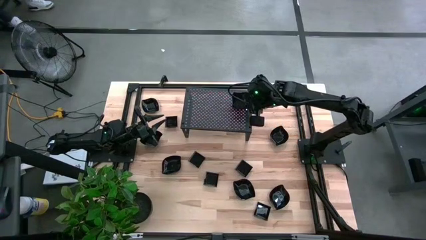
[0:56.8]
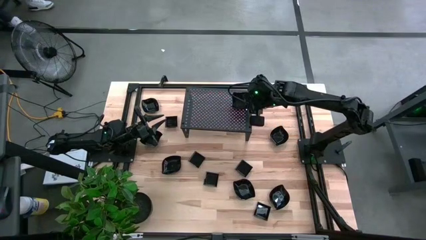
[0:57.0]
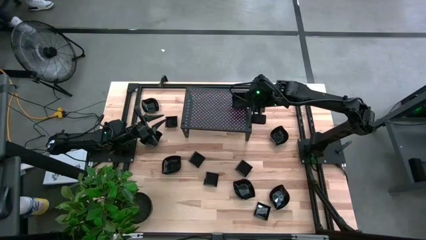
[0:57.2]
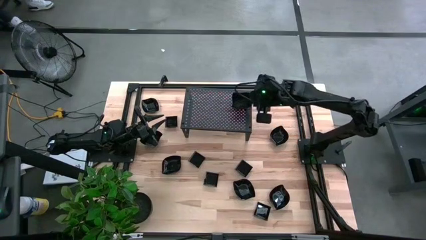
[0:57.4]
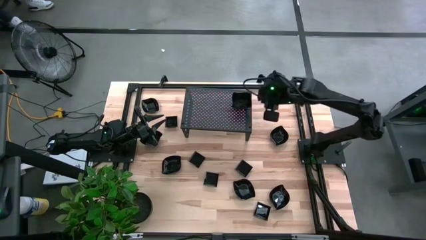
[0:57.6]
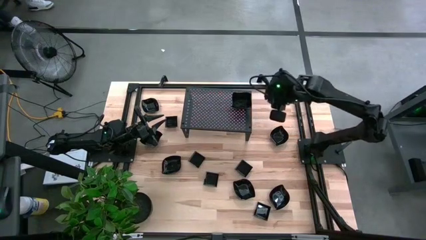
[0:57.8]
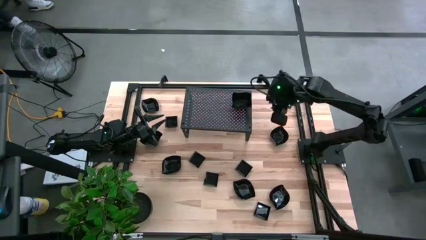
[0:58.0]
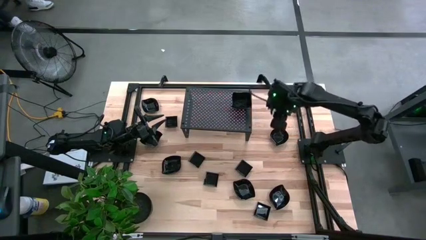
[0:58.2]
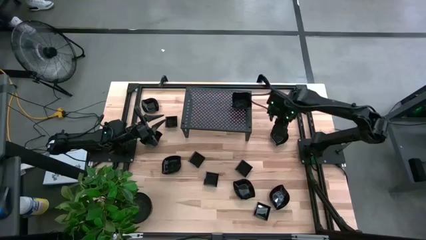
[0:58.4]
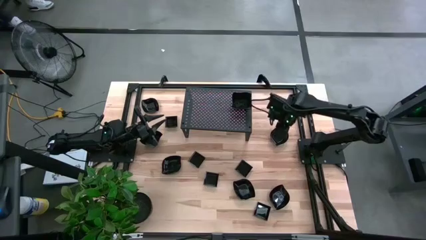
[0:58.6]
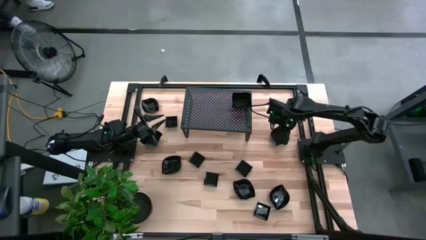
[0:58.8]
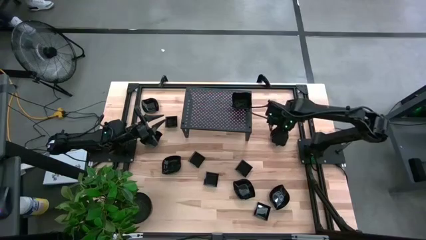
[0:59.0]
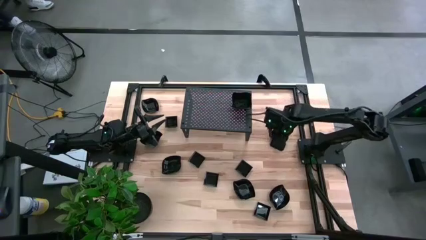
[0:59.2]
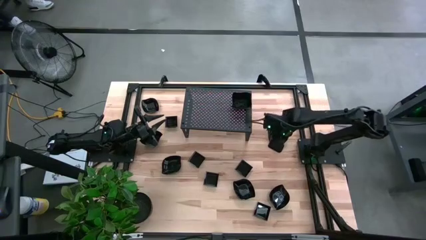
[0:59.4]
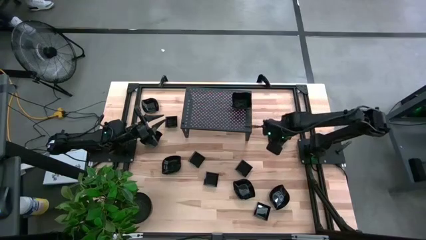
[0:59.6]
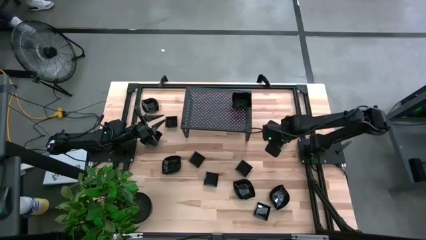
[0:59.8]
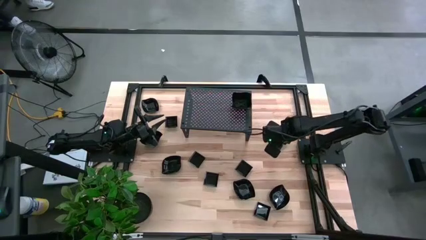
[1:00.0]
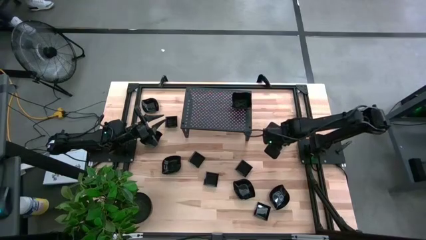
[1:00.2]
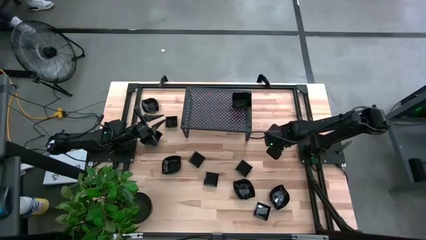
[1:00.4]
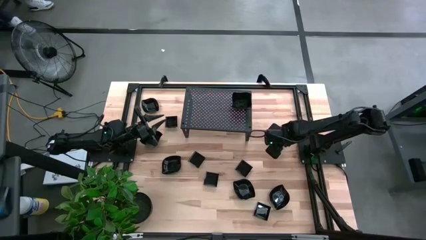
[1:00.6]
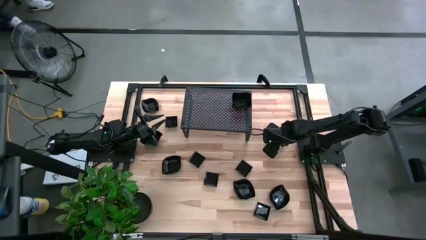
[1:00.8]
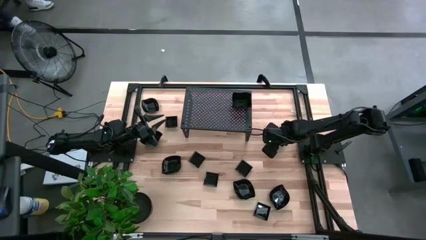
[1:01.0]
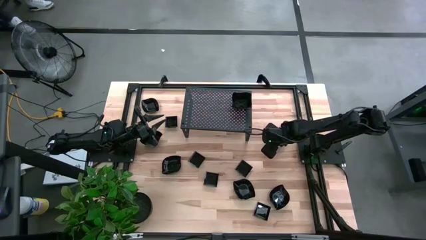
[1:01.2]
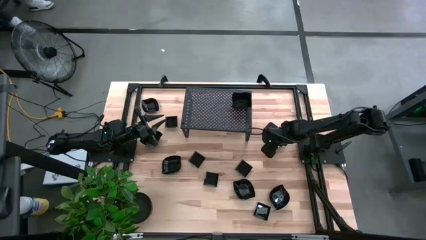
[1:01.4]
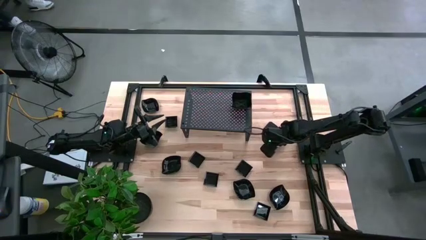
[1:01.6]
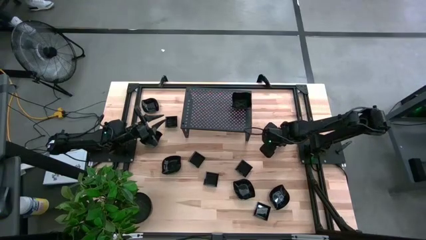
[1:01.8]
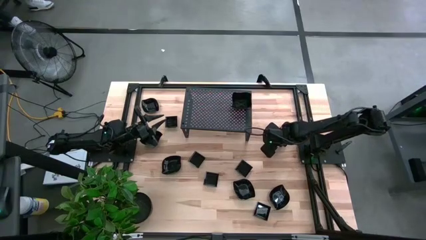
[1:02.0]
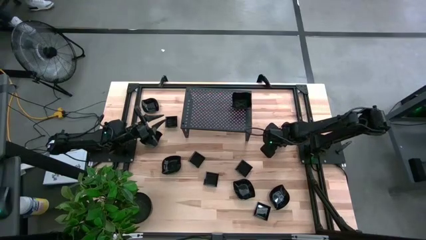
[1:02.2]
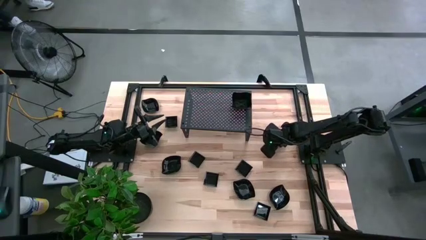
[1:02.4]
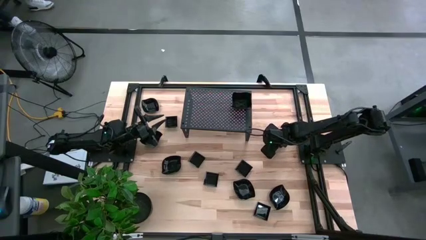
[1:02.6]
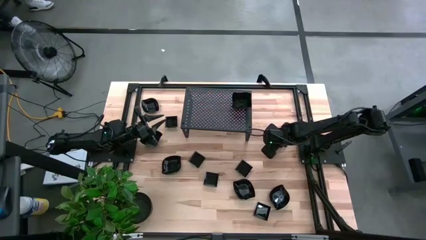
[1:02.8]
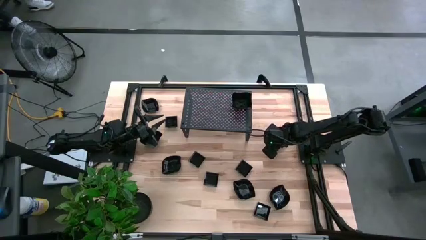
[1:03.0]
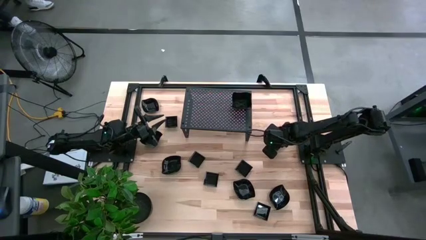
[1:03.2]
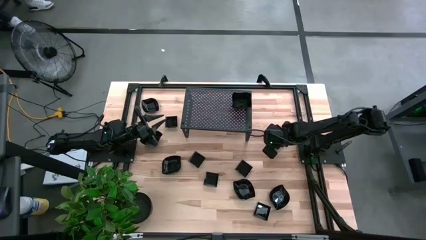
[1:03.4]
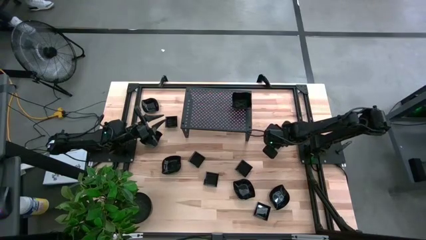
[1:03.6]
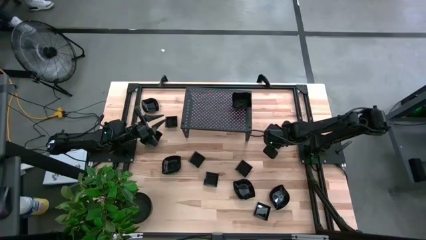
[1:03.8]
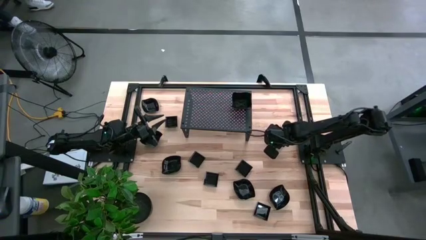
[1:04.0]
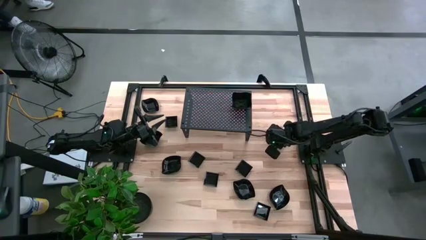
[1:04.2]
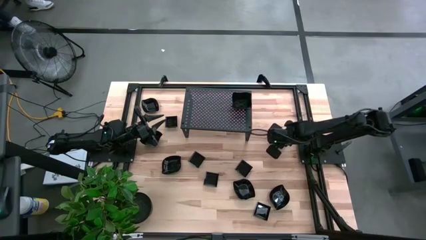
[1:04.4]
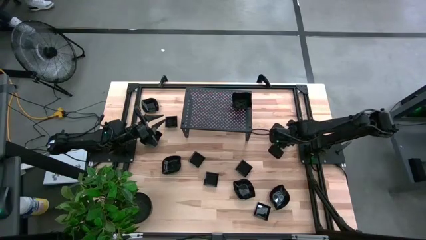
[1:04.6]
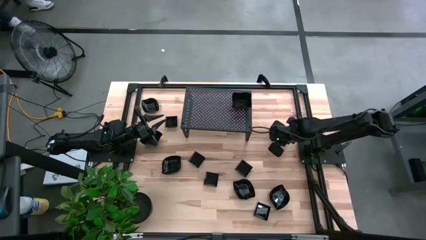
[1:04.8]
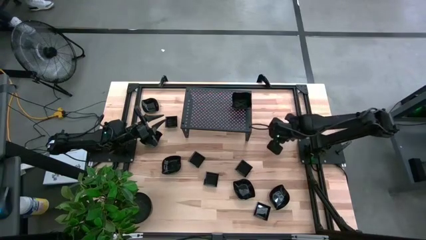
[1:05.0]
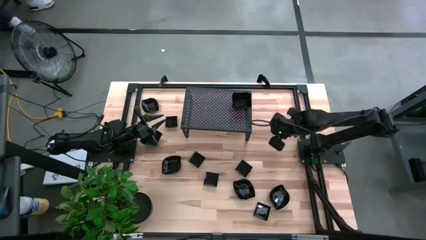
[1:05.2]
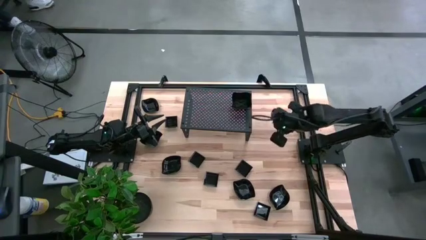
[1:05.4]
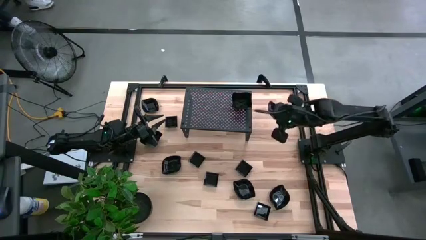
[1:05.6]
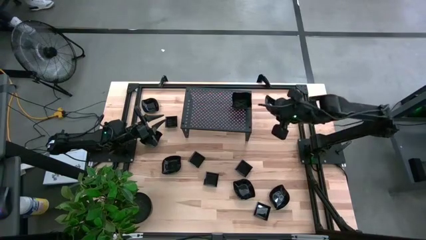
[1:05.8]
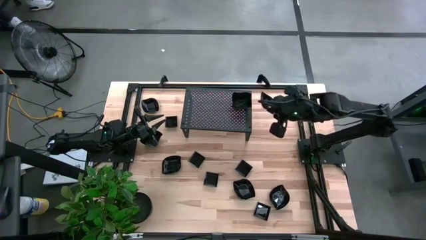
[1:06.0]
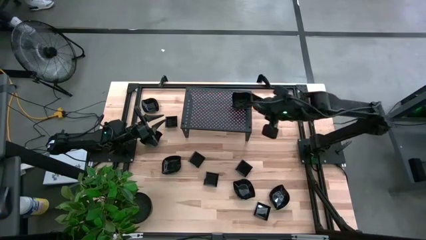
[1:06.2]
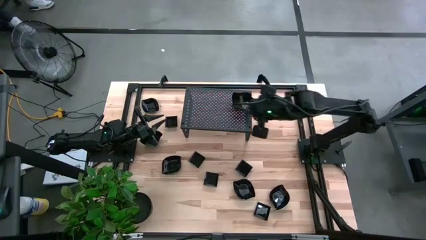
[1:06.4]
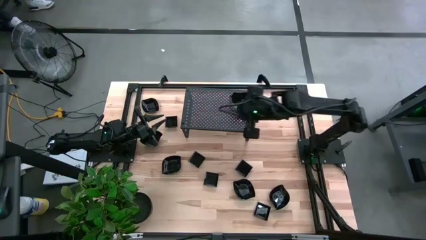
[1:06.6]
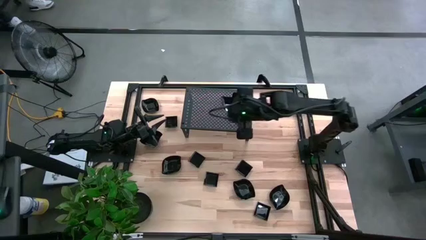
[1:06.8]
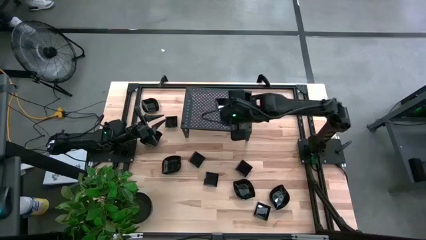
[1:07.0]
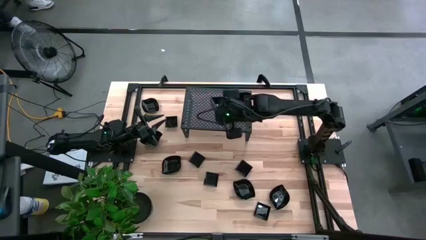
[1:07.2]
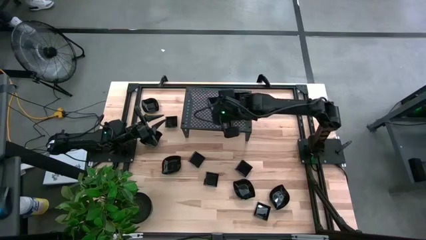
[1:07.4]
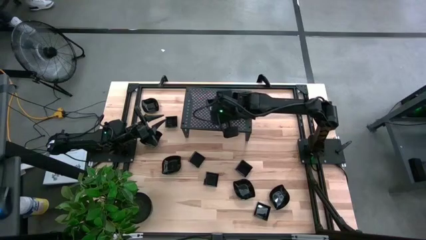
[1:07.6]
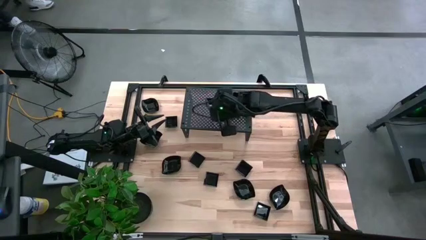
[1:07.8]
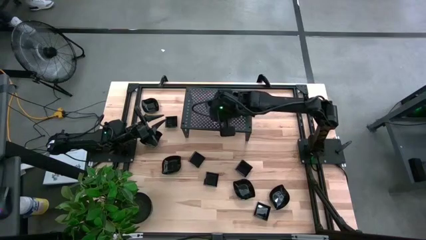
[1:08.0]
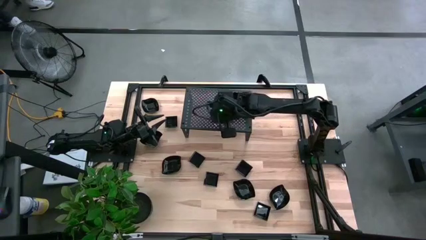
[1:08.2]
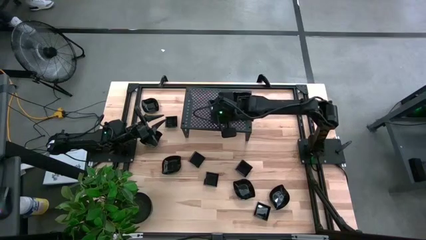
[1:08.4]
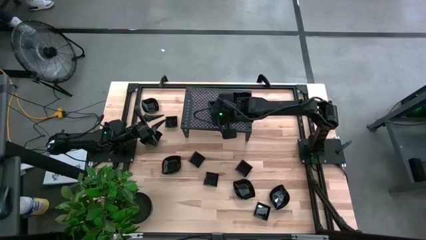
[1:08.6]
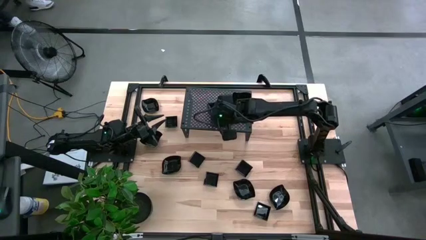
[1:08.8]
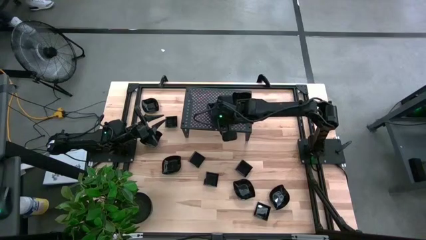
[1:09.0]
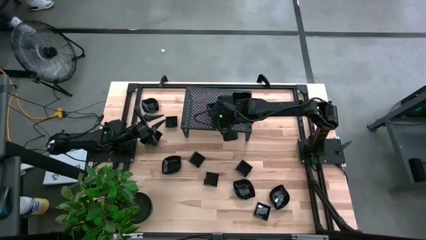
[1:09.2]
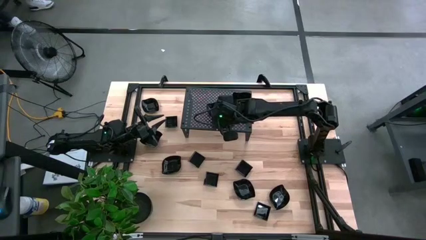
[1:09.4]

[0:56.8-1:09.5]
Task: Pick & Place Mini shaped plates
Put the leaf-shaped plate on the shelf
